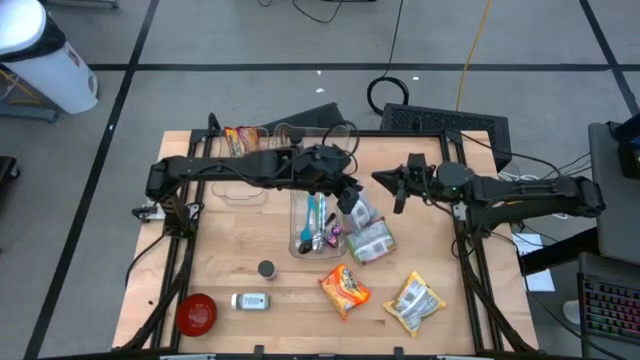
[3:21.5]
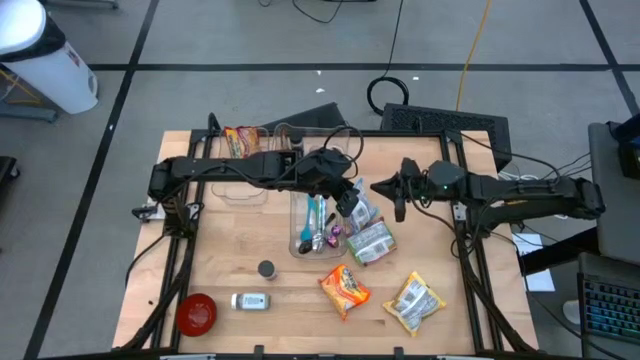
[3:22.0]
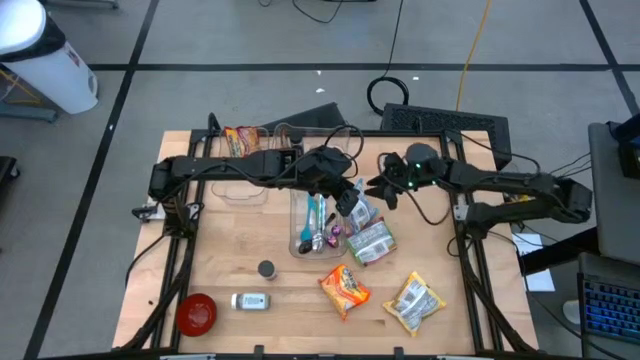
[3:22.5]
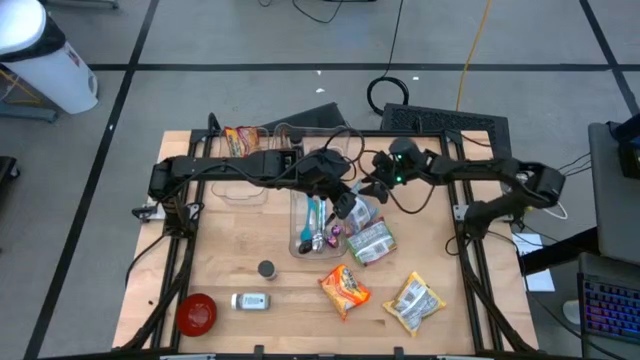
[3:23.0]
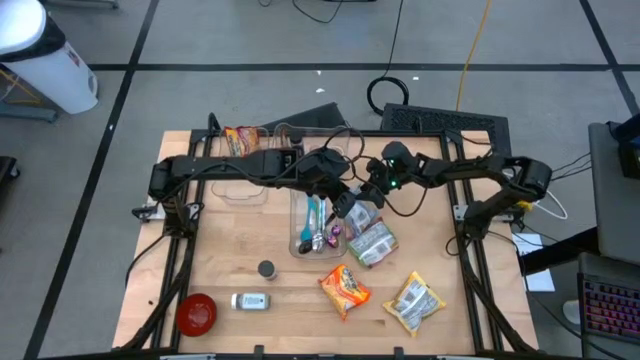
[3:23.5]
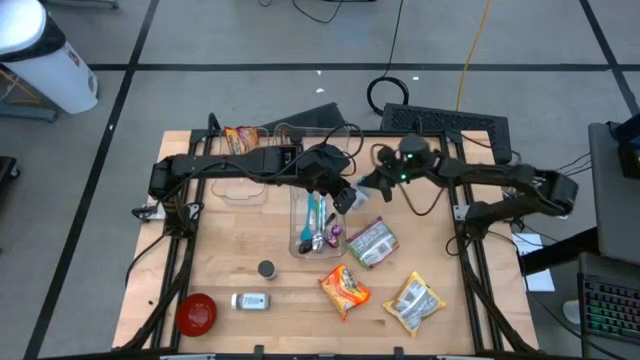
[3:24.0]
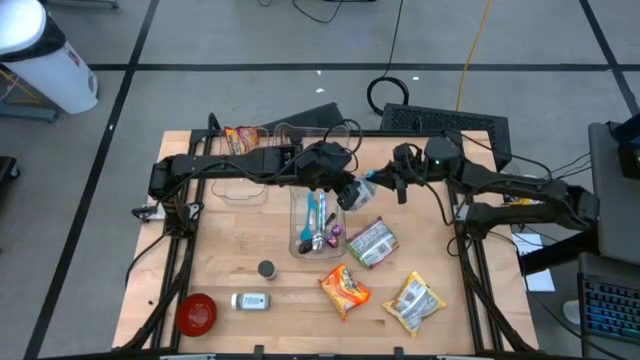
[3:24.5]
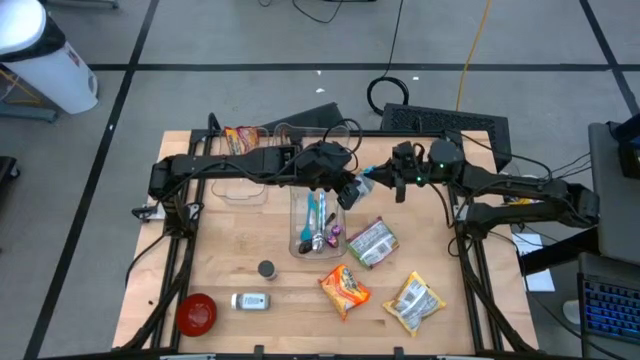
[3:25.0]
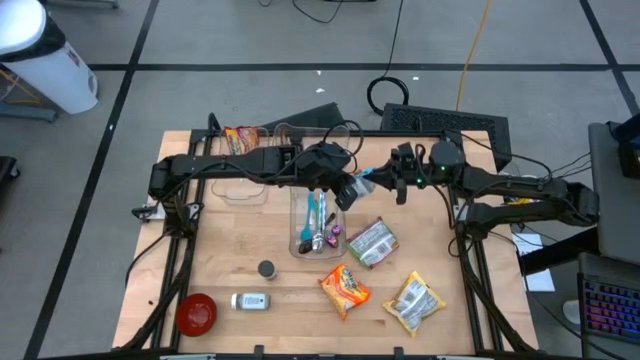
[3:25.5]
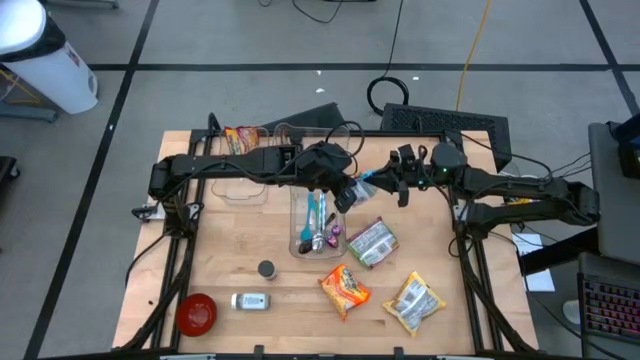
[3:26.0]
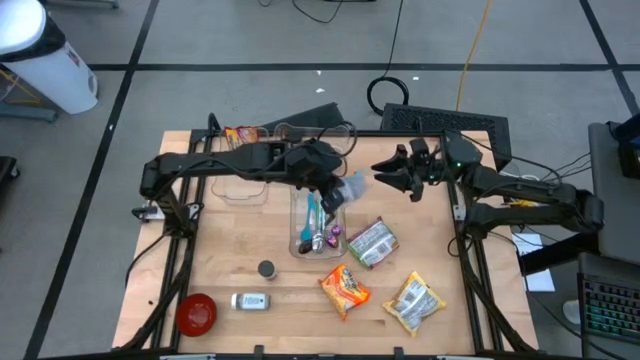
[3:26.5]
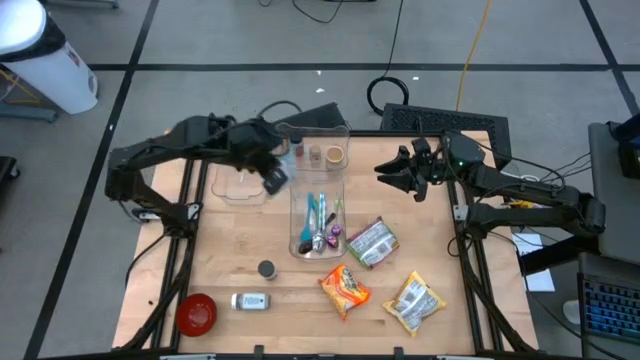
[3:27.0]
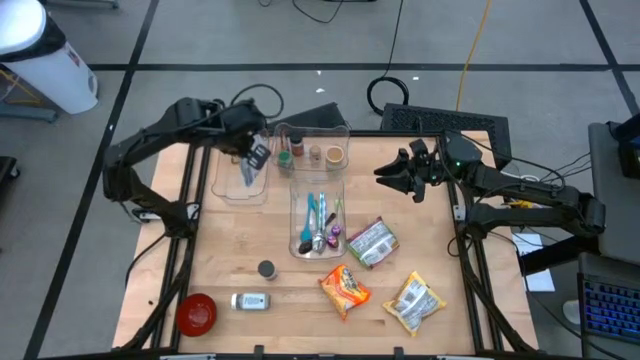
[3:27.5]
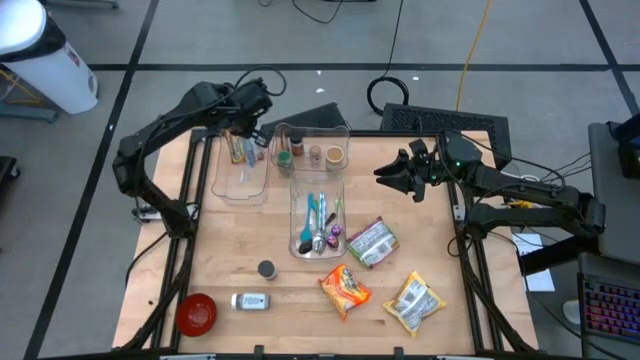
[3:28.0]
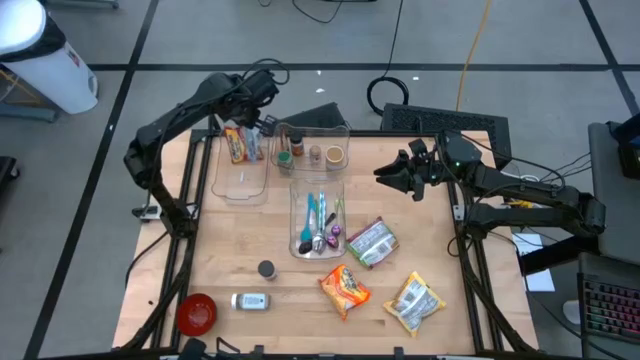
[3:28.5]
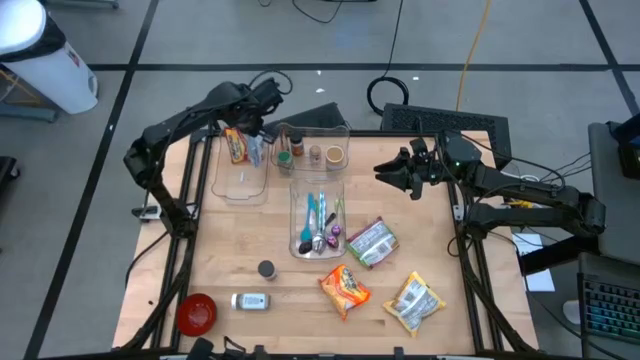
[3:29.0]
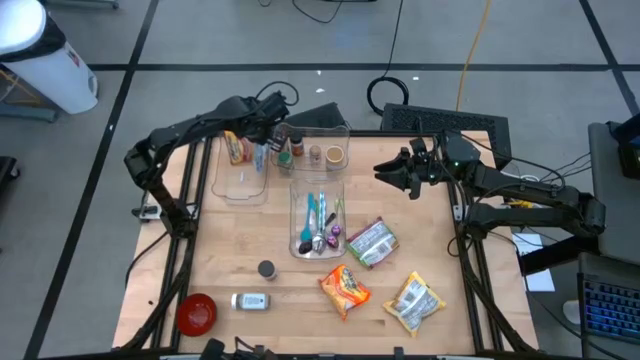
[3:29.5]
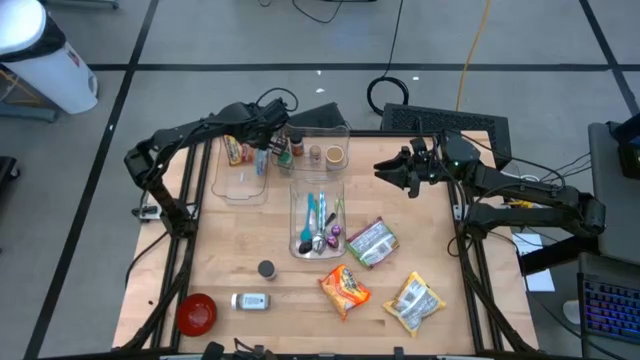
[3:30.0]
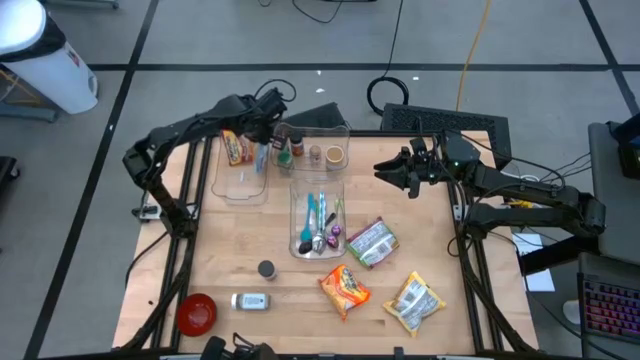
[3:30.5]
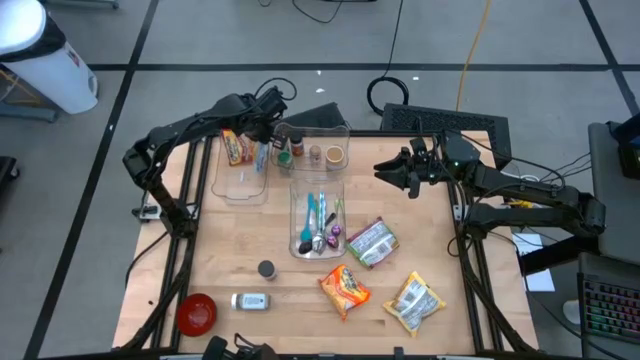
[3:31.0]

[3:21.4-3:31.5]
Task: Pick & Place Food Item
Put the blue noodle pack into the top left transparent bin

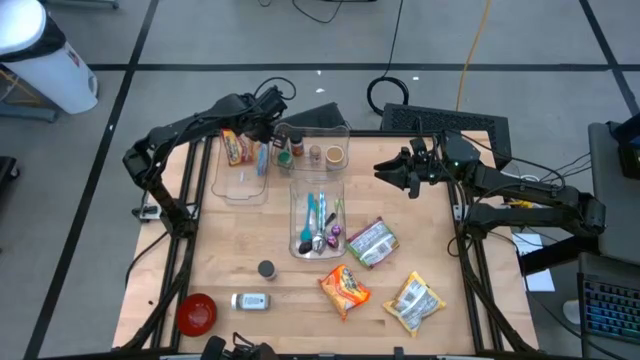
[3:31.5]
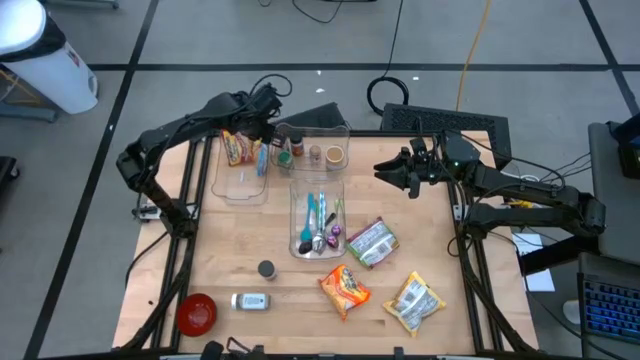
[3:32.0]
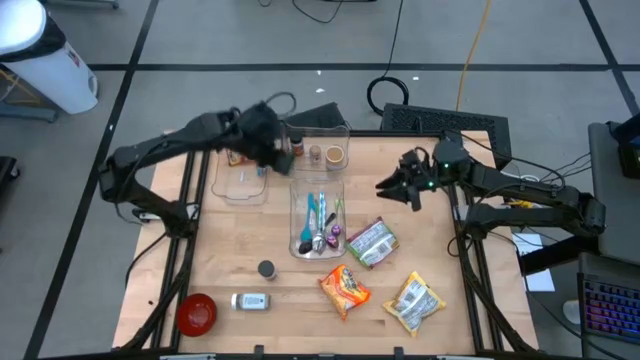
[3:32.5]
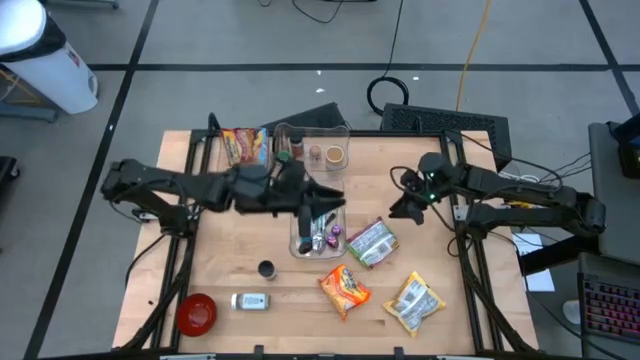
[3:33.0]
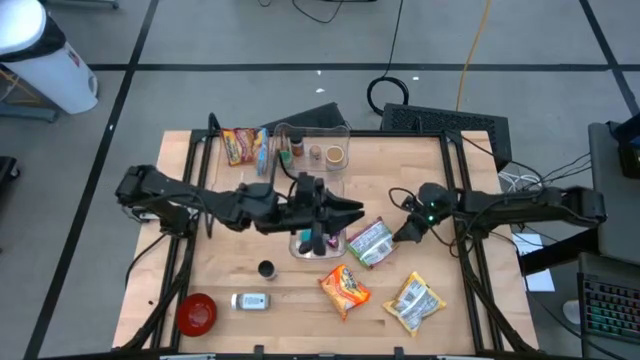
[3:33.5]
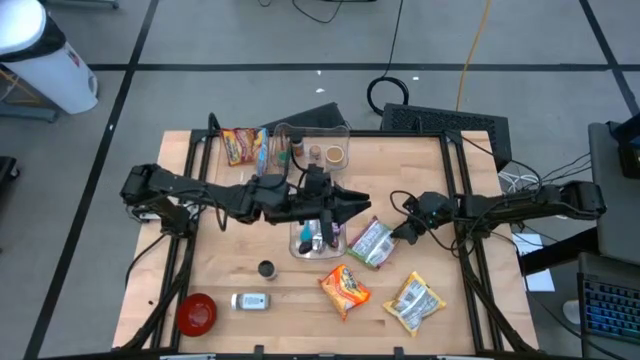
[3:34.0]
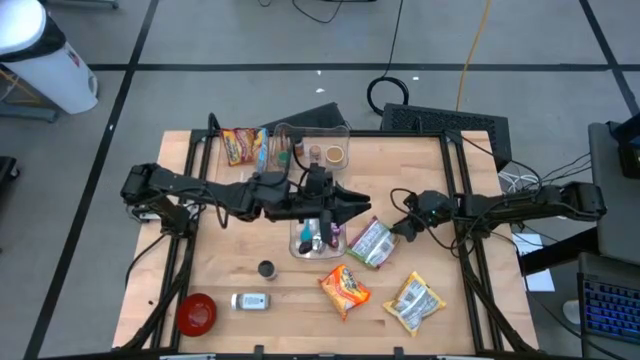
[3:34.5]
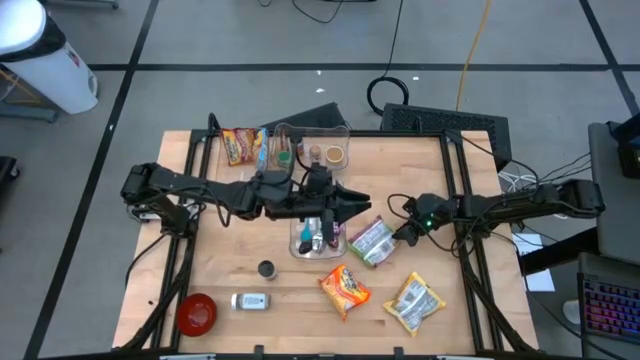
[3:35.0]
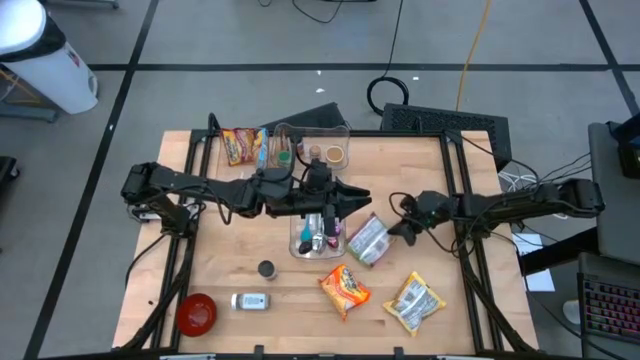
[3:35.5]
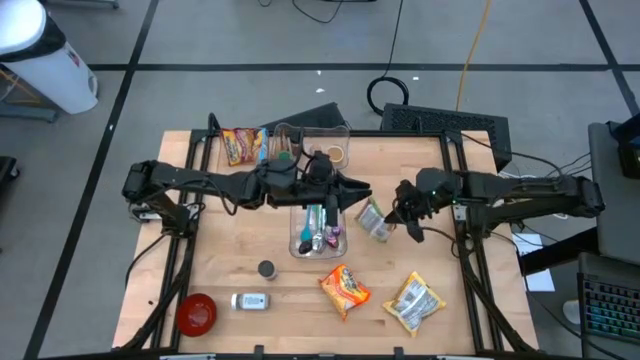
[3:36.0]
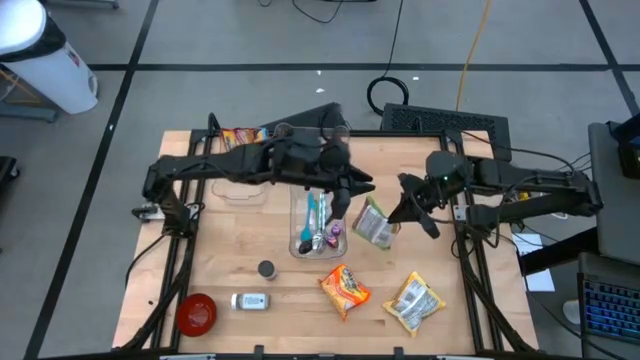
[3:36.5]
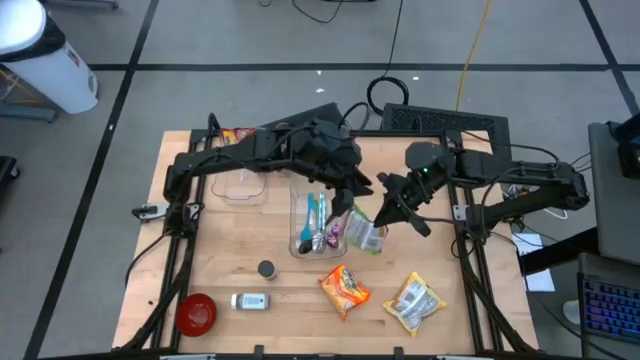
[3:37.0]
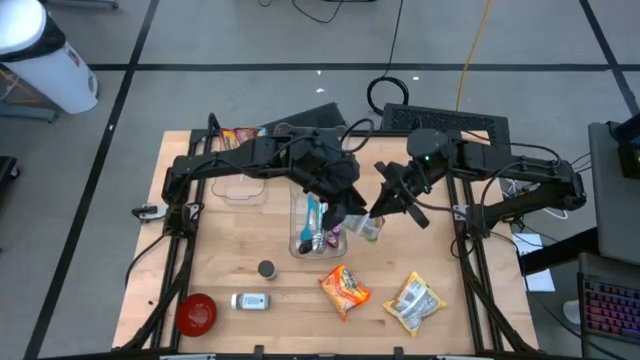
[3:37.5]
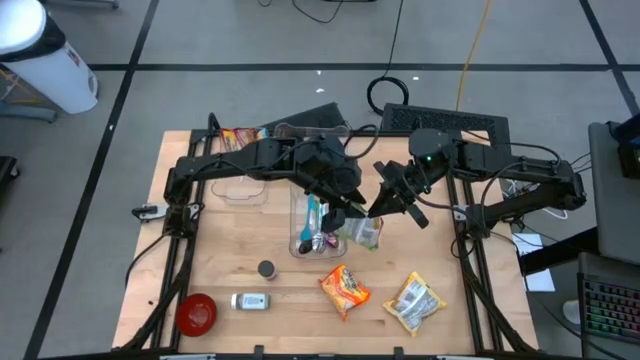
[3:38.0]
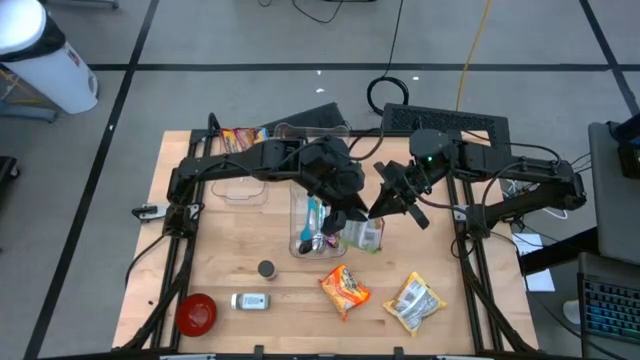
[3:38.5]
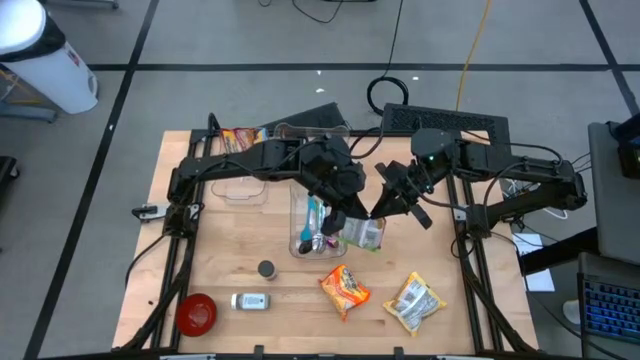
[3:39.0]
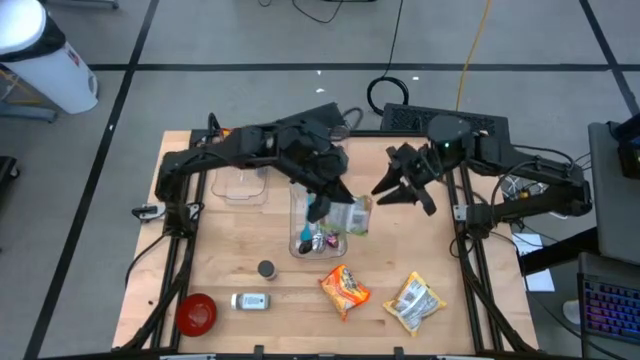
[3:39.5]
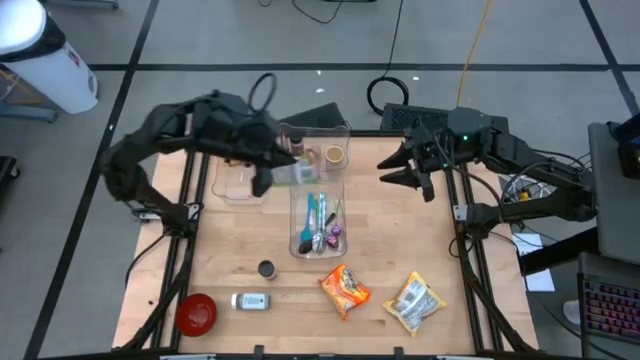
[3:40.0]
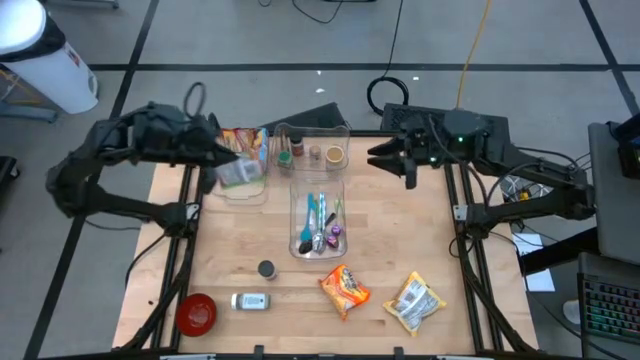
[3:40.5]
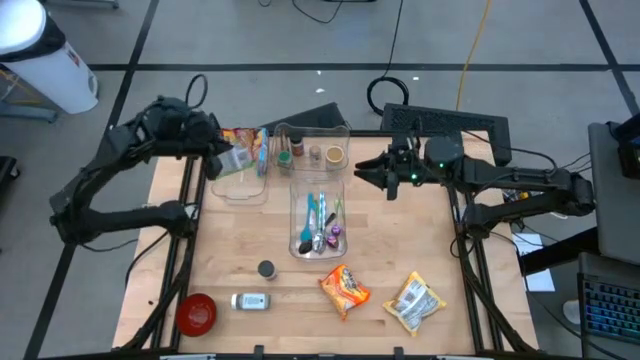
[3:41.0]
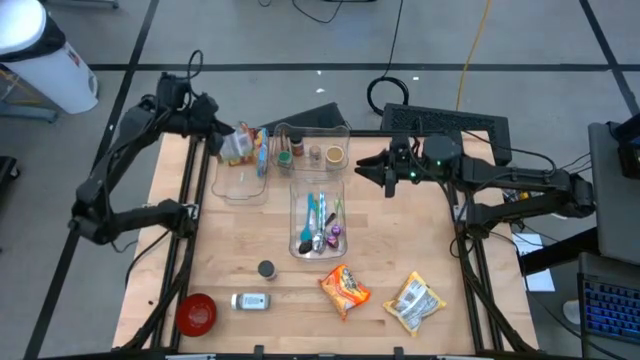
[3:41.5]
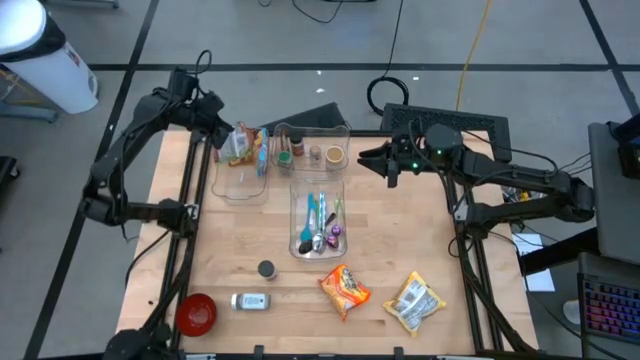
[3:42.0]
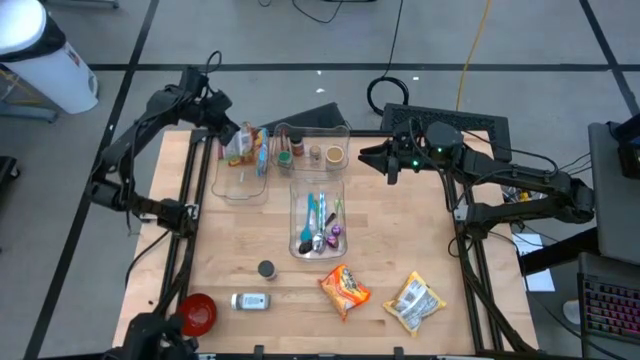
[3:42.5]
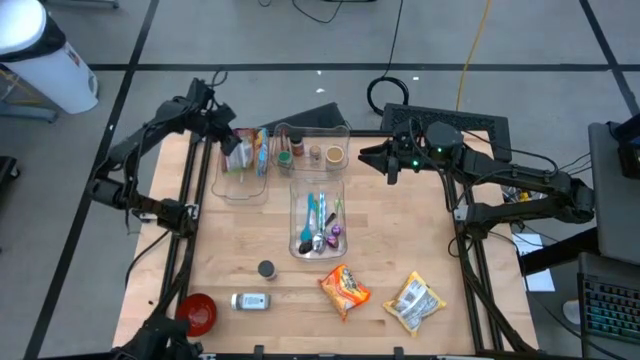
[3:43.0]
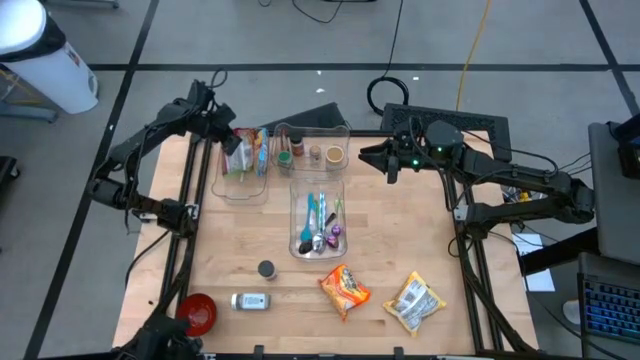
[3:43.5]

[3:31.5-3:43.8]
Put the green noodle pack into the top left transparent bin
